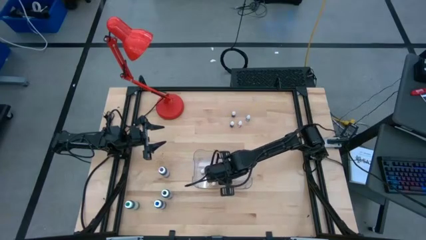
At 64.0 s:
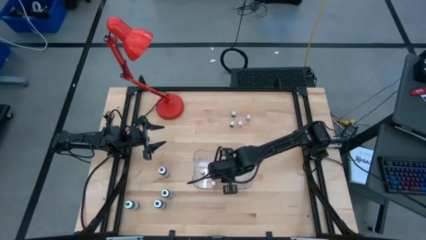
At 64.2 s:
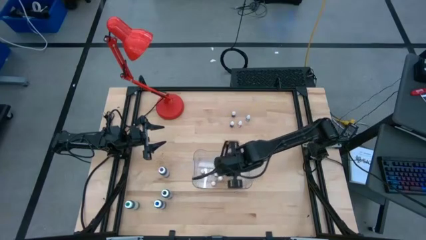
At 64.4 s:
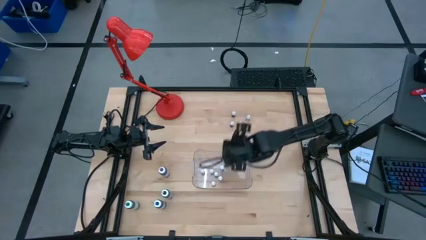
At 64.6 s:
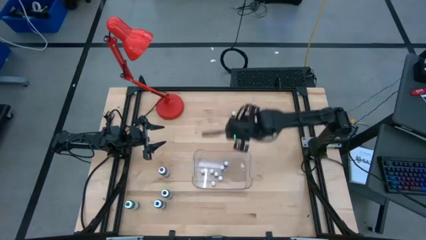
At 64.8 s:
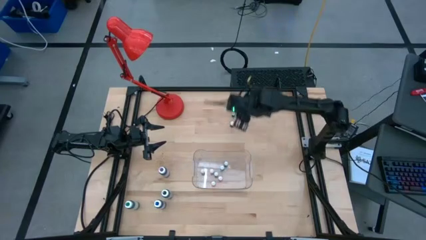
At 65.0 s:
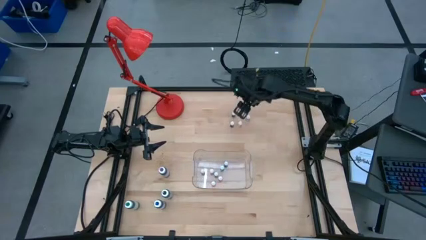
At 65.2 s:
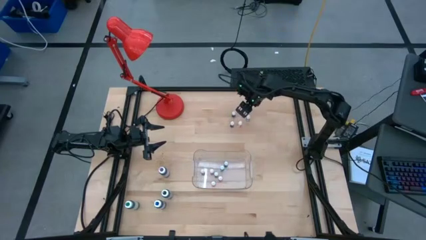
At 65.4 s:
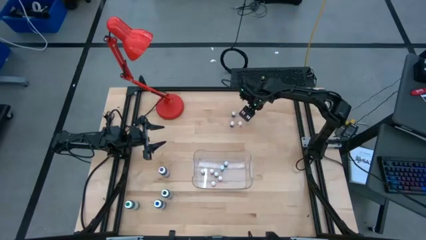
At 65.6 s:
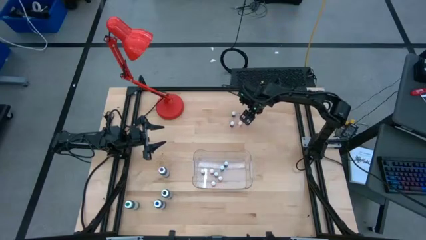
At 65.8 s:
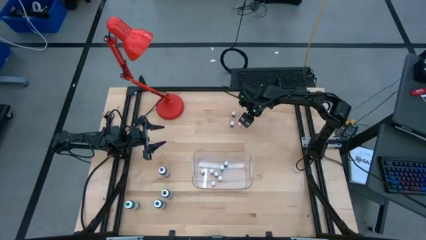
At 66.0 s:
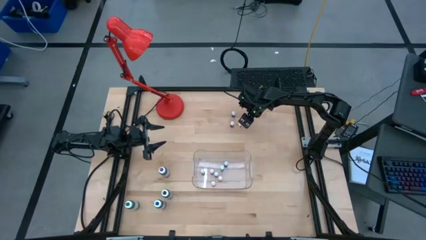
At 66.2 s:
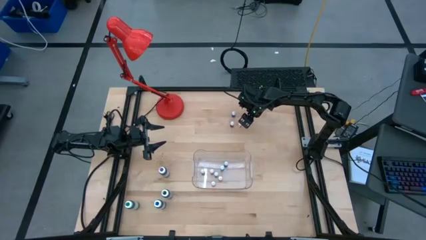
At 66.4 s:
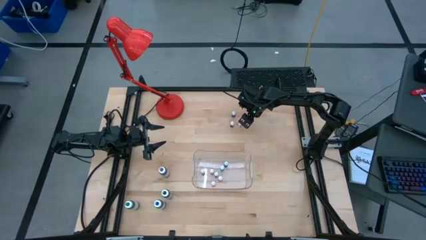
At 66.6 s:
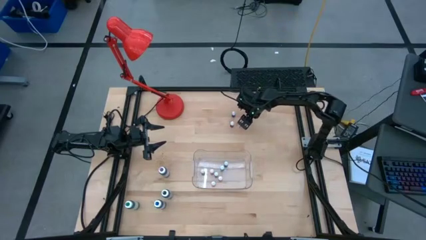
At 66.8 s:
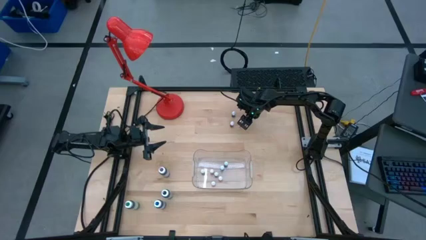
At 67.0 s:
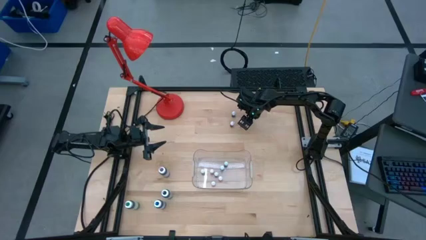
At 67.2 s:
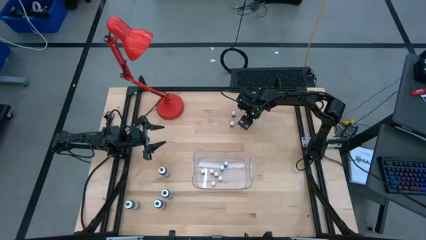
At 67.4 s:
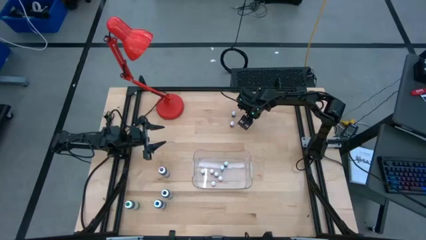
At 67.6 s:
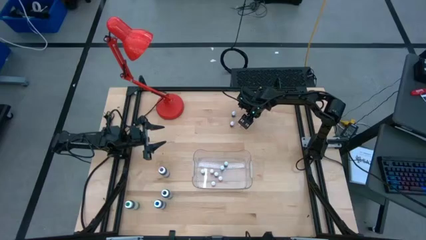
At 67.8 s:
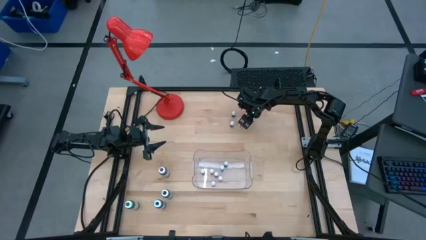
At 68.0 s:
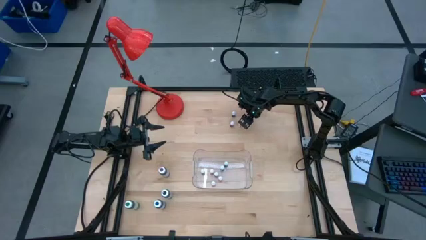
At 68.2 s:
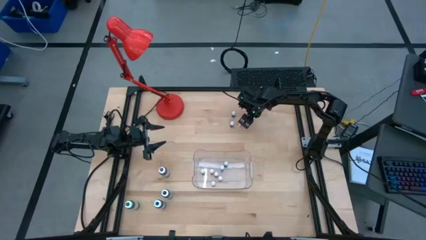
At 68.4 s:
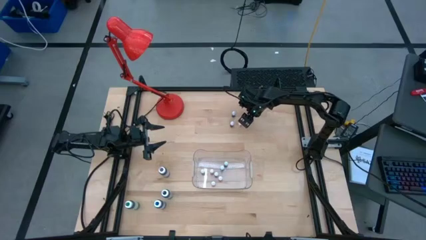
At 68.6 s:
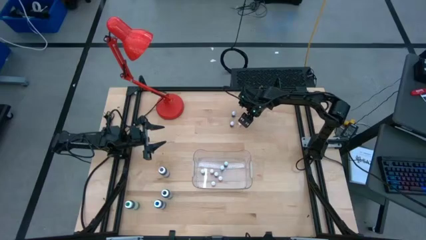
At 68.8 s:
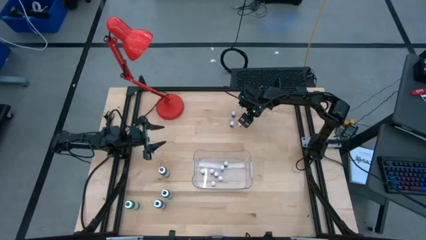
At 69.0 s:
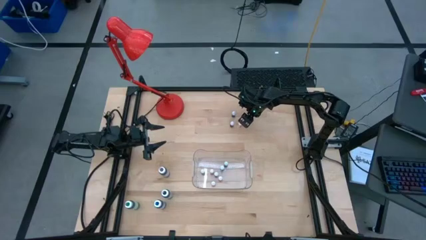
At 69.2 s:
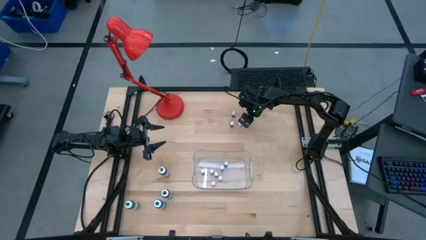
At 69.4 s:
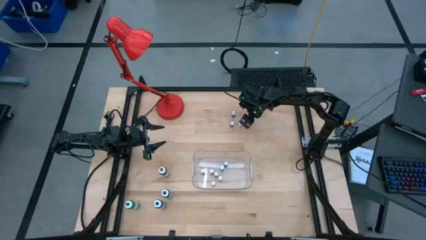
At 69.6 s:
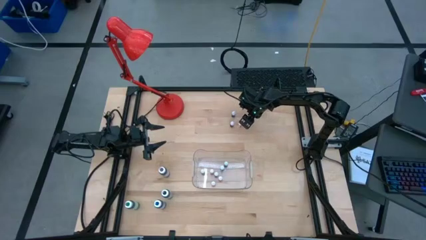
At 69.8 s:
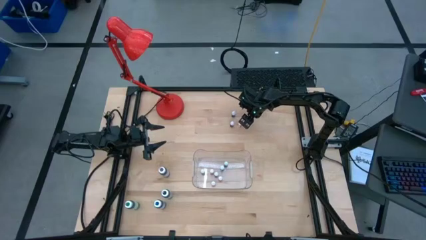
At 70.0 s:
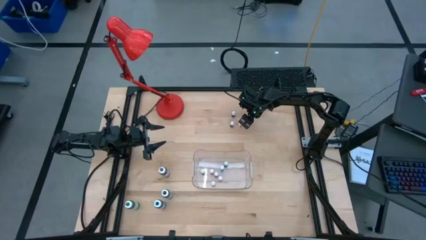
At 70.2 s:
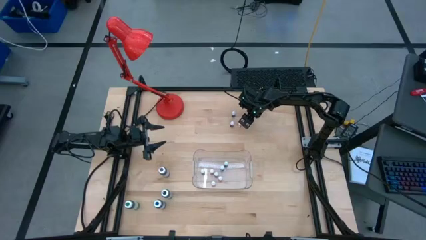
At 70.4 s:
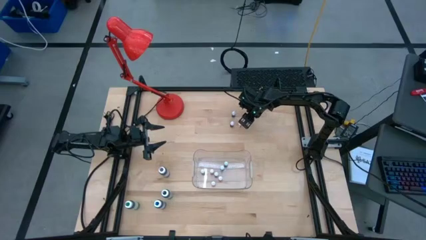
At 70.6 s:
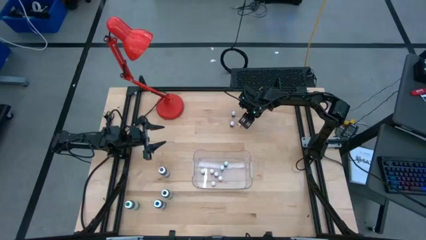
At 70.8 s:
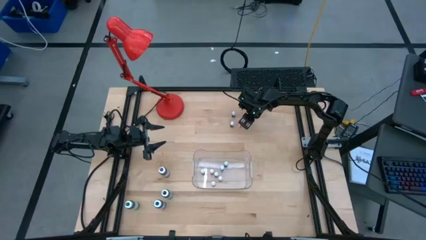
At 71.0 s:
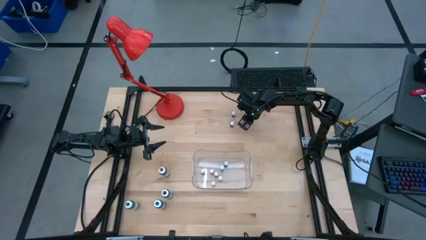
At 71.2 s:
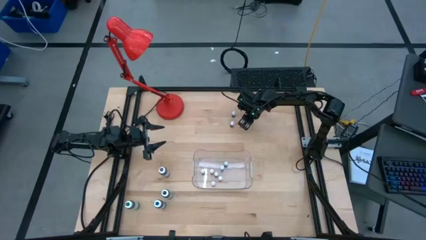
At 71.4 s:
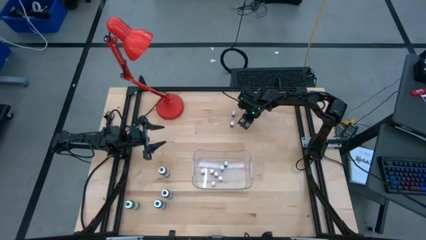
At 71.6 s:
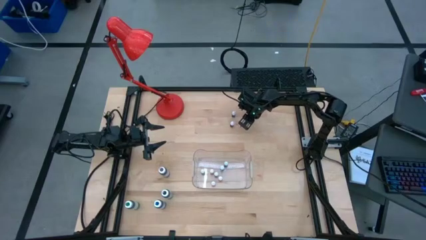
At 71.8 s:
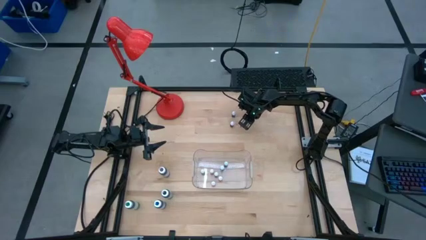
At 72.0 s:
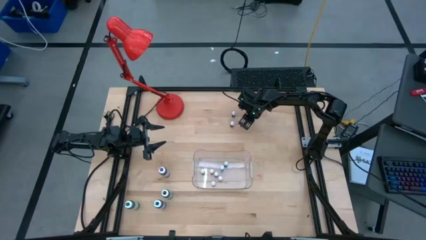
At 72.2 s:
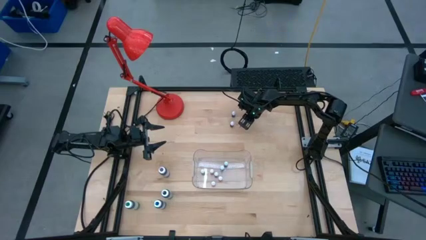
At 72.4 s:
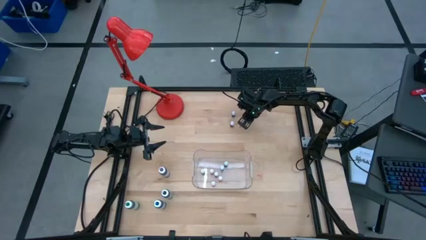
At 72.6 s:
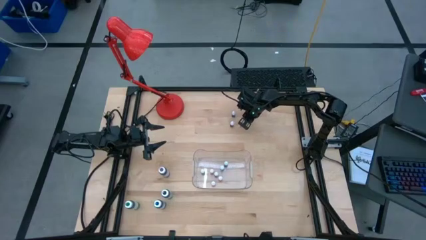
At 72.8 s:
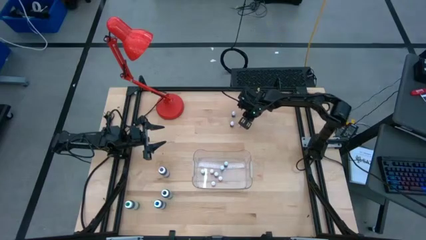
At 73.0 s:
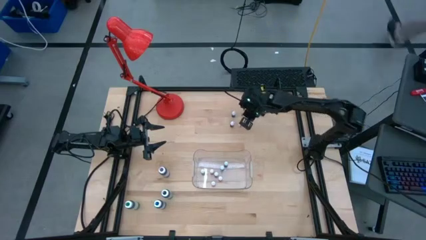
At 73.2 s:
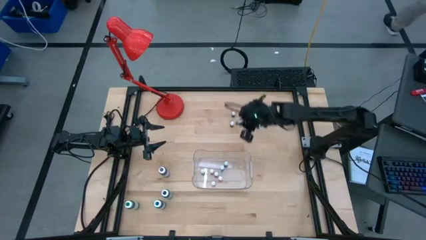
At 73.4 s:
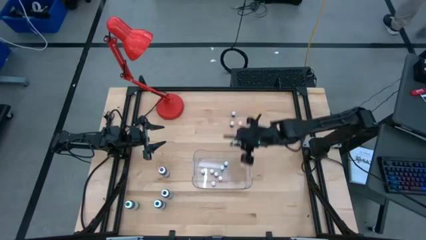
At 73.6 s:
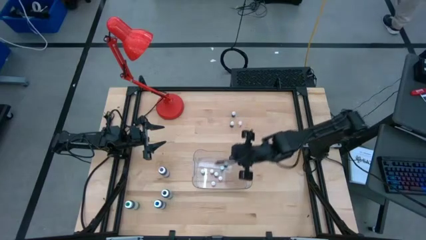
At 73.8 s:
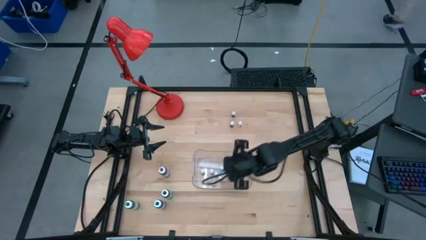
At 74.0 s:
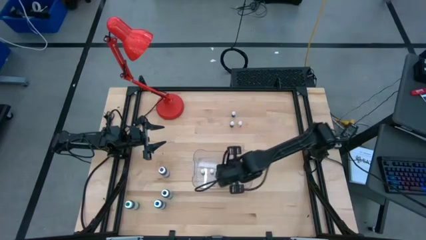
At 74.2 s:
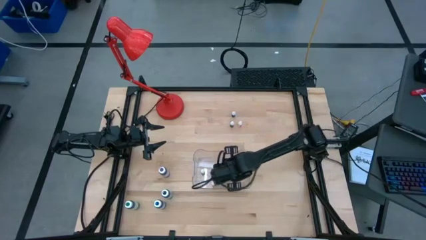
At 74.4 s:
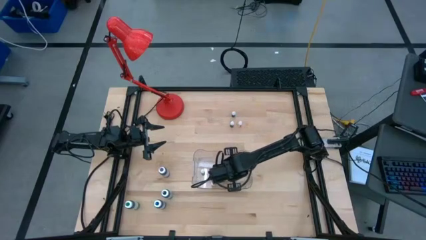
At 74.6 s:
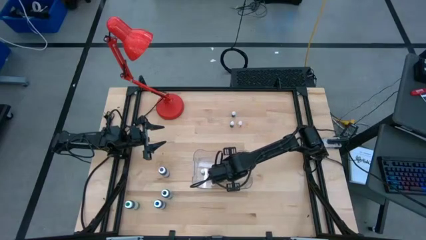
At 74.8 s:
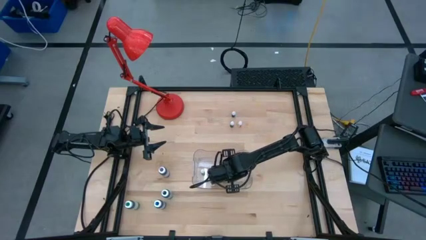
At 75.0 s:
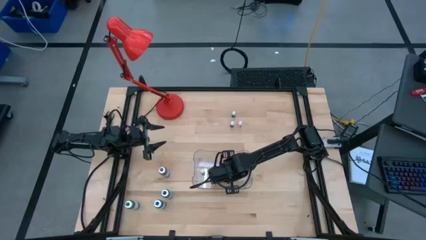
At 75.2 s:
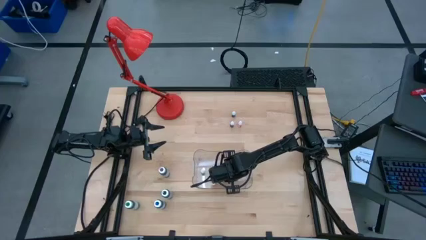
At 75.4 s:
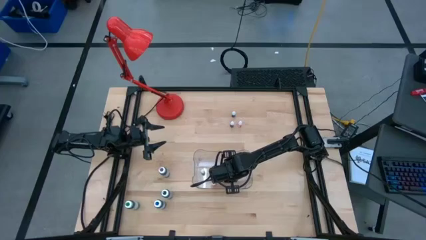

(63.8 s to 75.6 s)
Task: Pick & Place food coloring
Put the small blue food coloring bottle into the transparent bin

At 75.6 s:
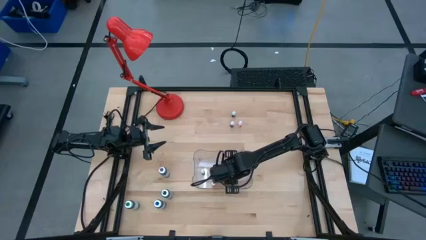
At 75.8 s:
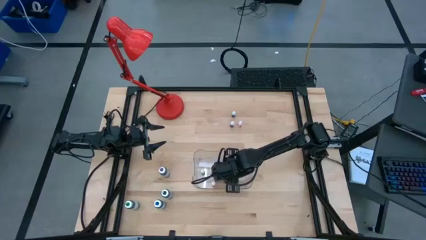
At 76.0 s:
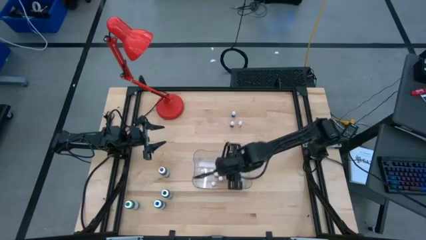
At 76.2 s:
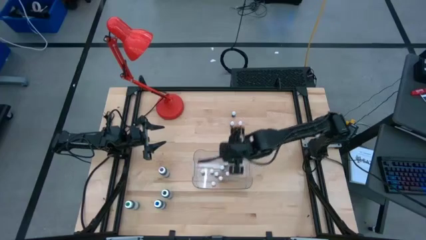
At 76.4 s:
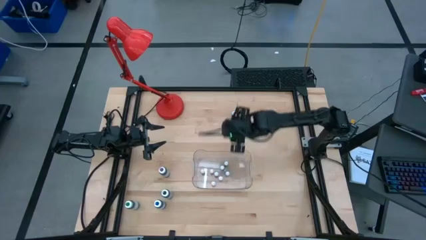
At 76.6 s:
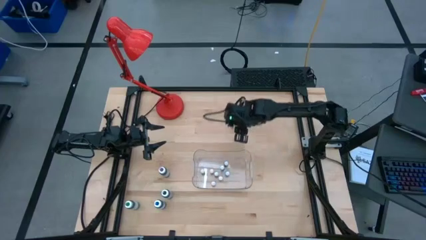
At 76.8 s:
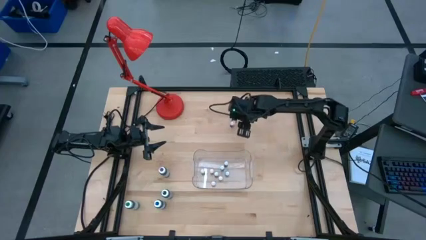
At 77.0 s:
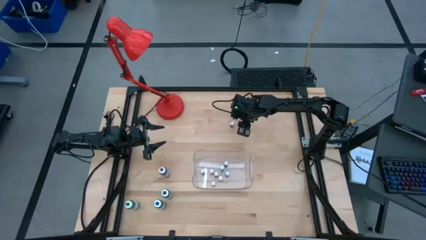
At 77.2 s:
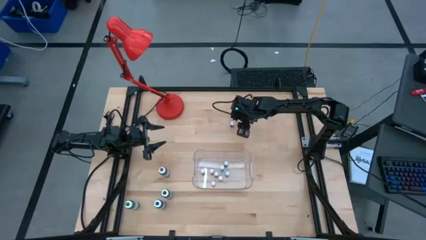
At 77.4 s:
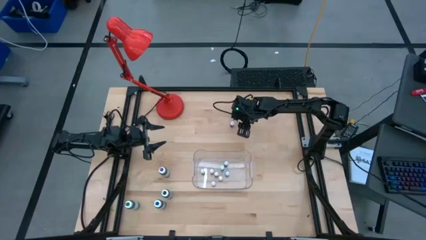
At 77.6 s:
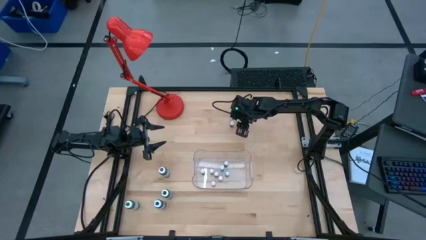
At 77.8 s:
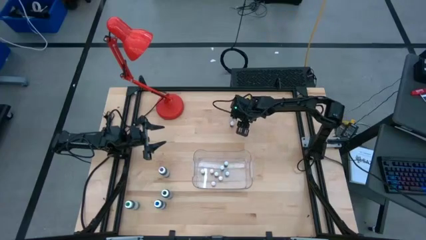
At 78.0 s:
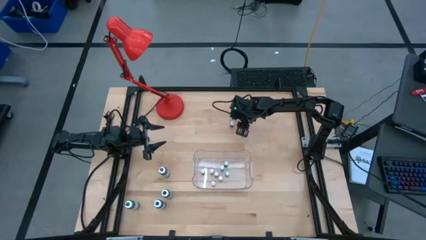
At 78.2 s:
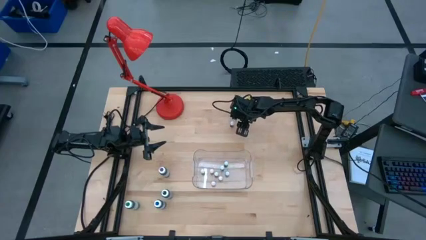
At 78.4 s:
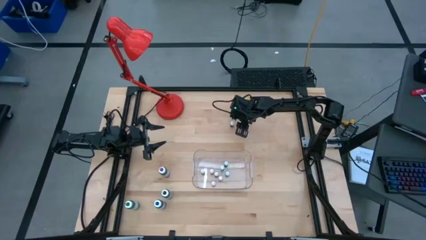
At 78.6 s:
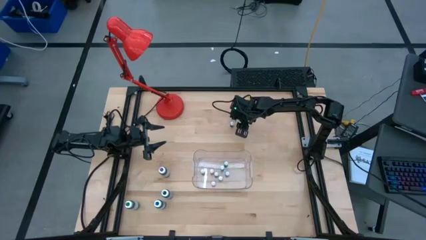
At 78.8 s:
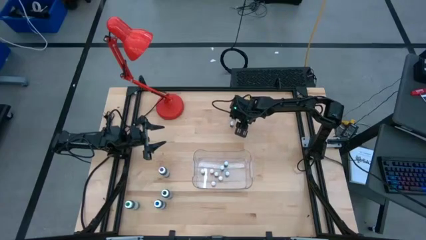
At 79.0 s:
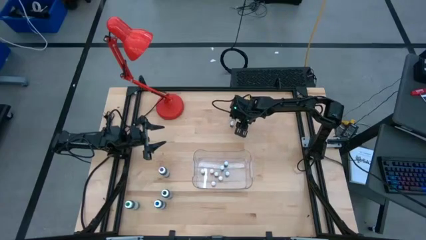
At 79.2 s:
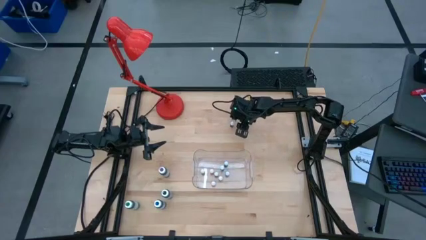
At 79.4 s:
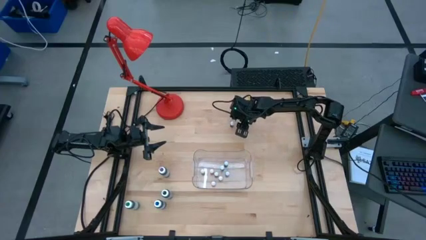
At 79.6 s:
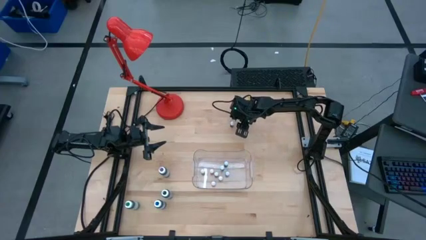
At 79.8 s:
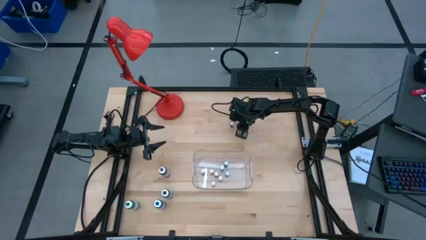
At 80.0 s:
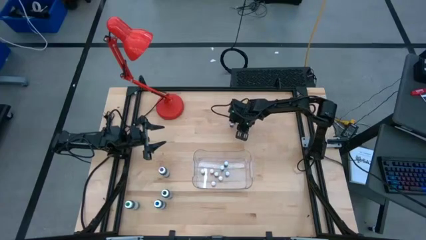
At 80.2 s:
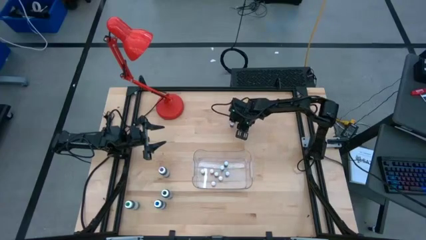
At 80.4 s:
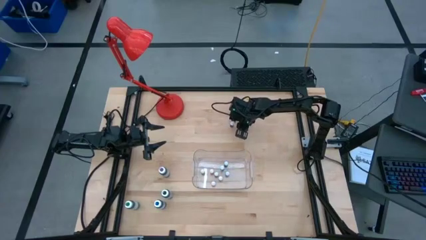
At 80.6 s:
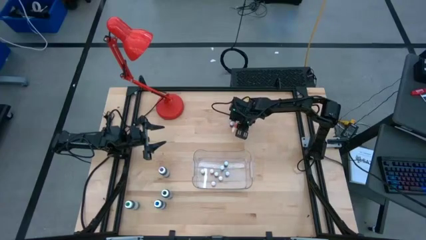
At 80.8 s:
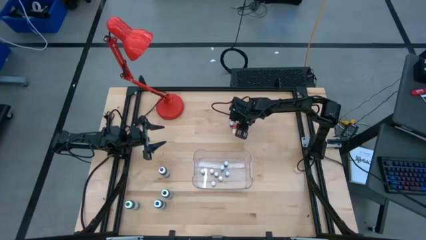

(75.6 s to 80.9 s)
Put the orange food coloring bottle into the transparent bin
